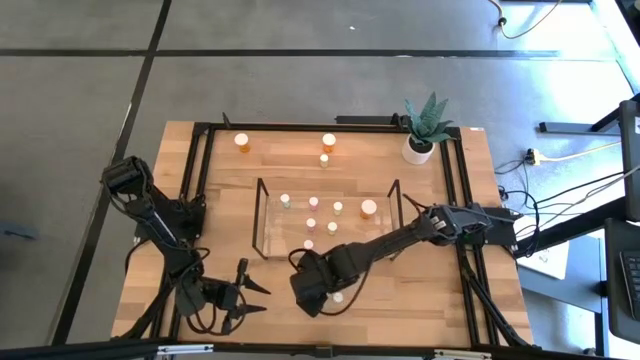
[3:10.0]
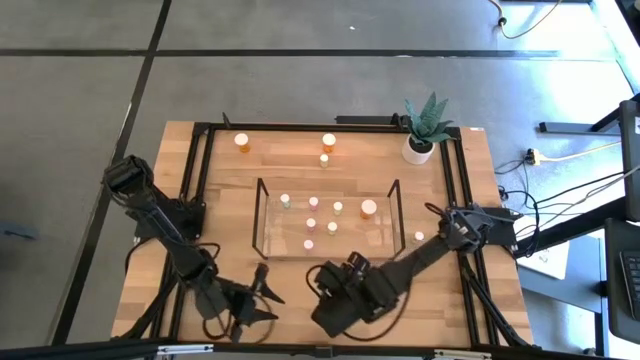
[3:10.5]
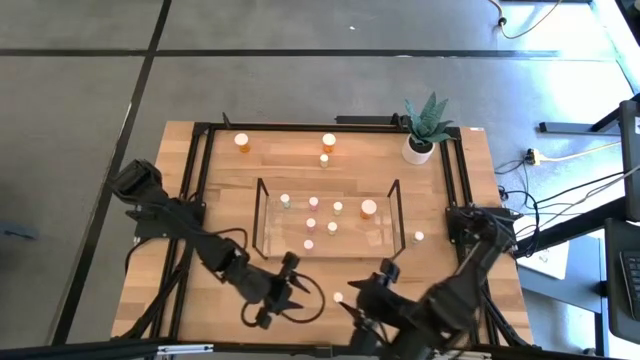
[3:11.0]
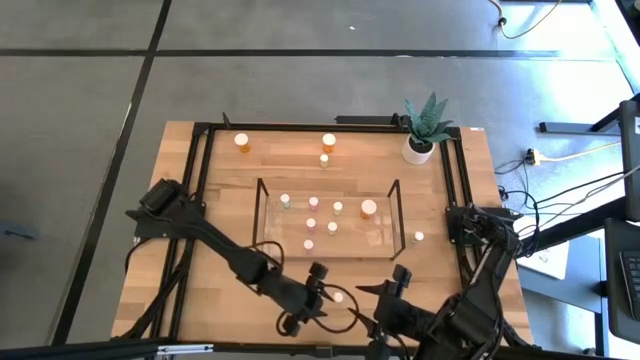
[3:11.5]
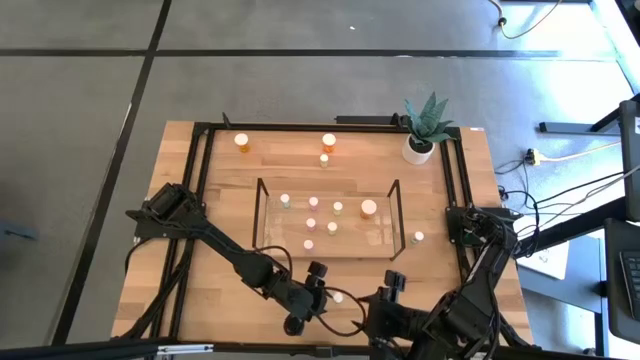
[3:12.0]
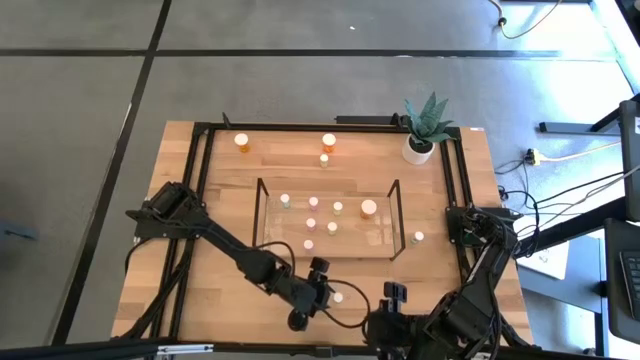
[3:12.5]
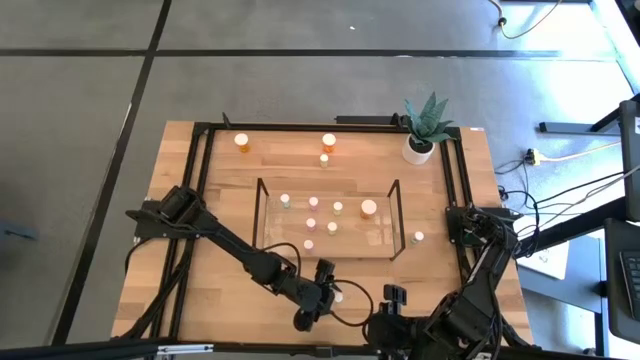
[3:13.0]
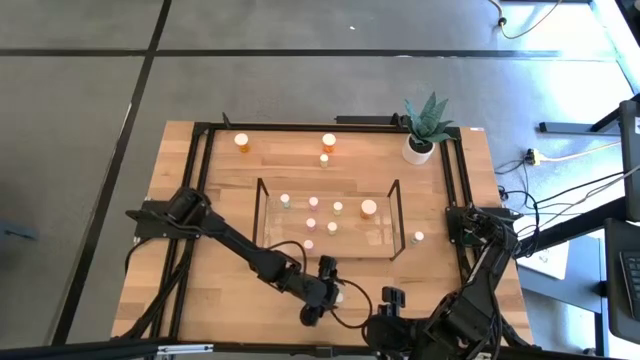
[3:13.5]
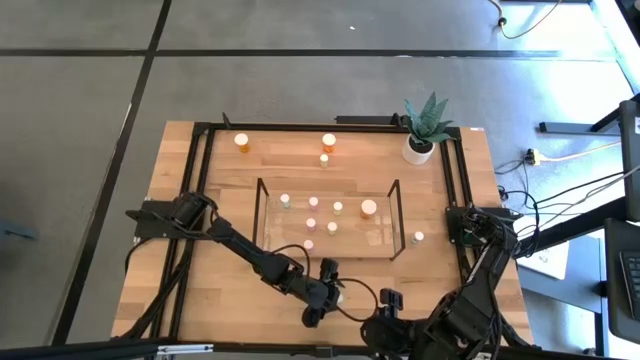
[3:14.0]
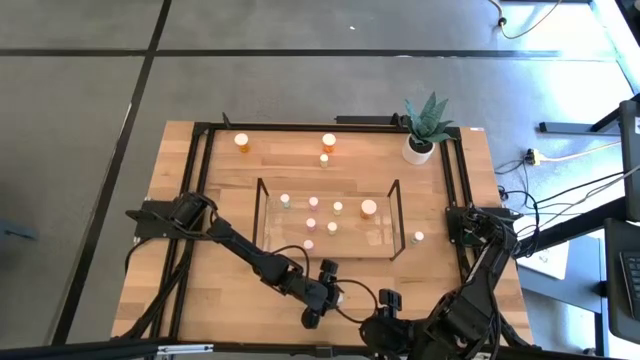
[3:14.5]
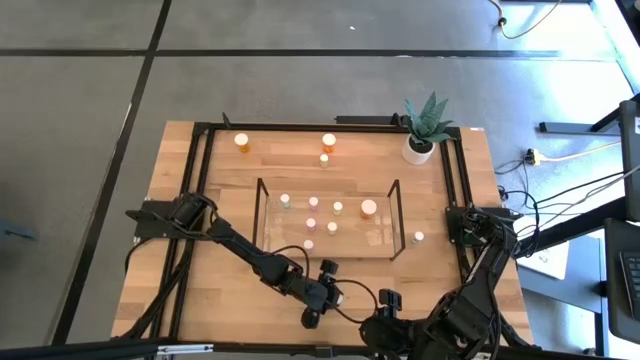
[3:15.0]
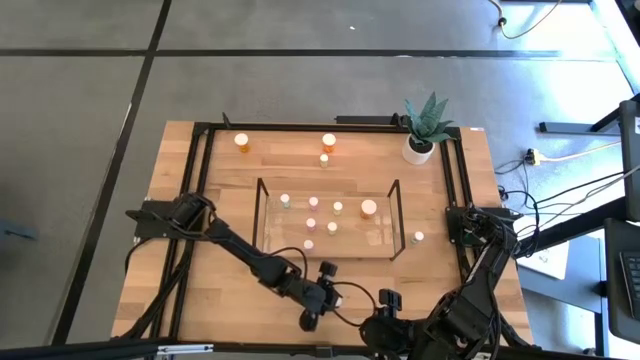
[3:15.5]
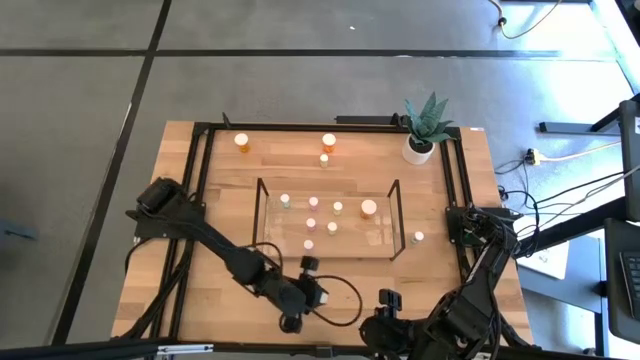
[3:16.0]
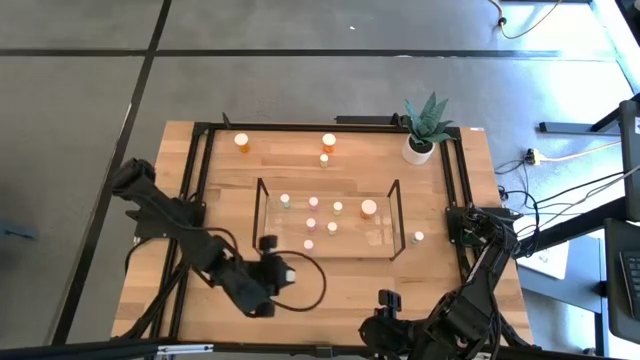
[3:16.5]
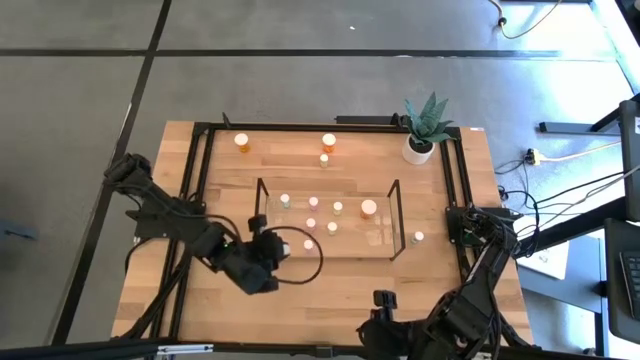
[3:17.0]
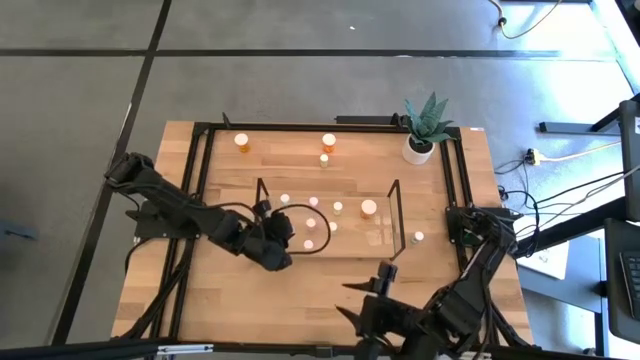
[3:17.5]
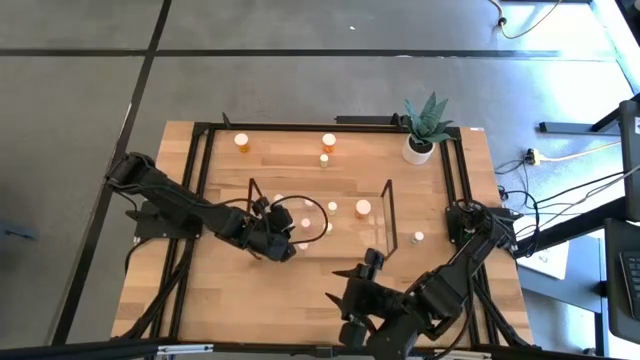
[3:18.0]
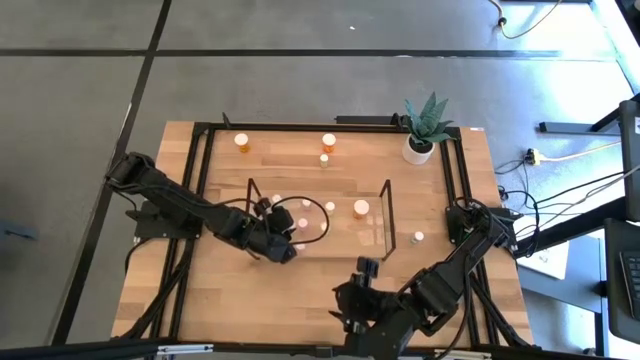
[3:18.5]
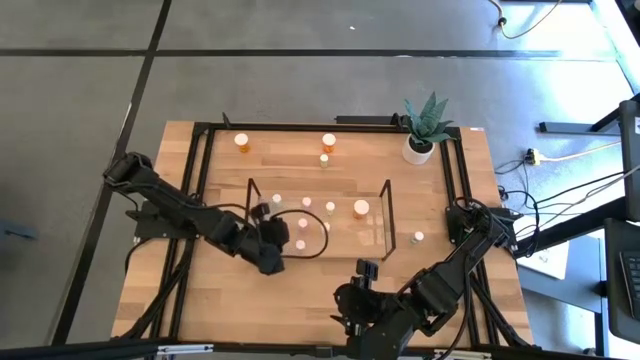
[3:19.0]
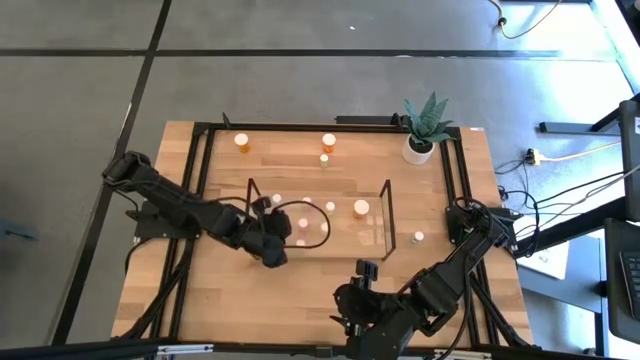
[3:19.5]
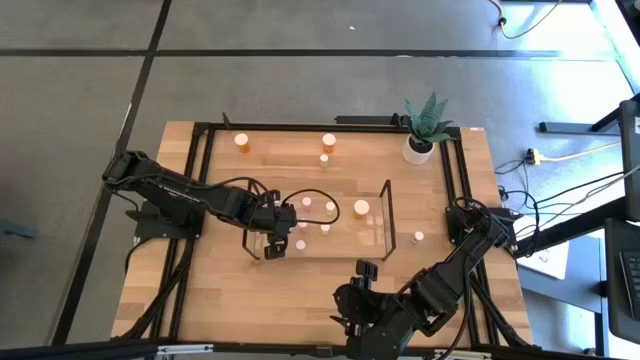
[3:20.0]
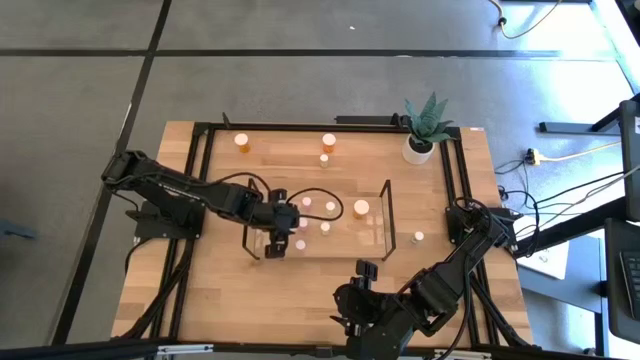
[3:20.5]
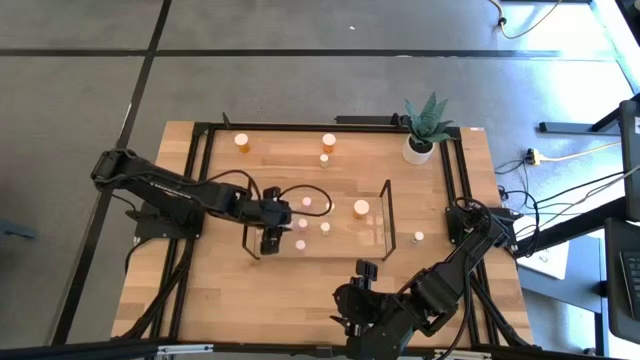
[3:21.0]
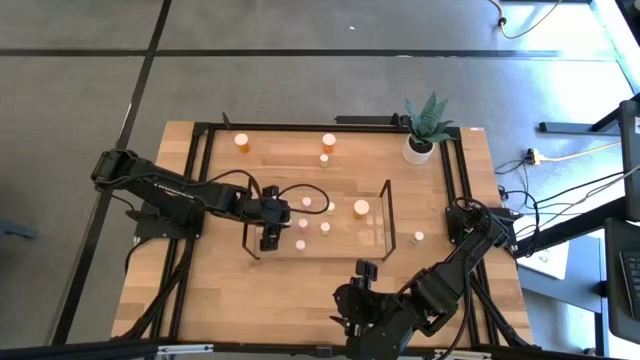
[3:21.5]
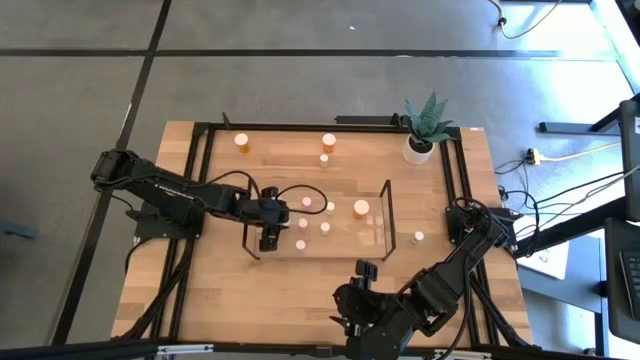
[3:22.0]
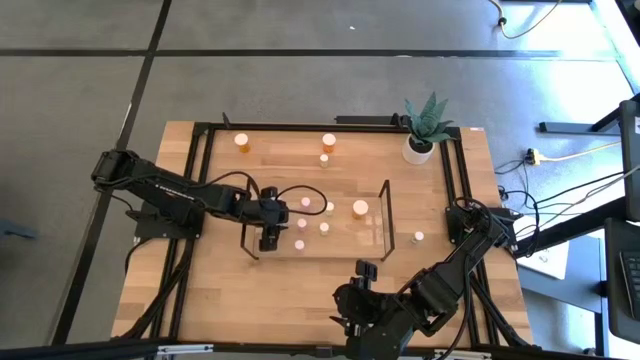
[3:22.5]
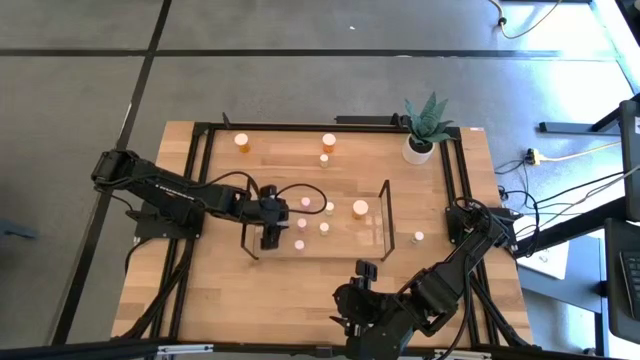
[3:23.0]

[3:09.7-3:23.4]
Task: Pick and place medicine bottles onto shelf by color
Put the bottom blue pill bottle on the shelf aligned with the other blue pill bottle

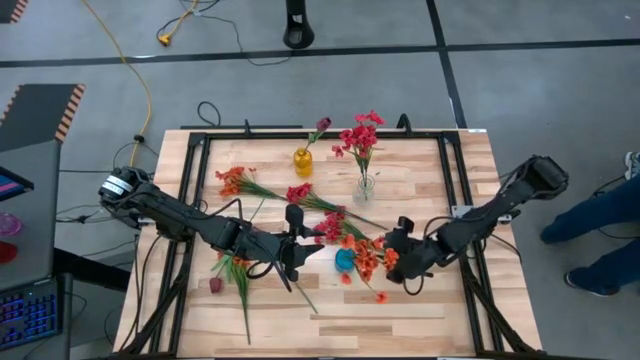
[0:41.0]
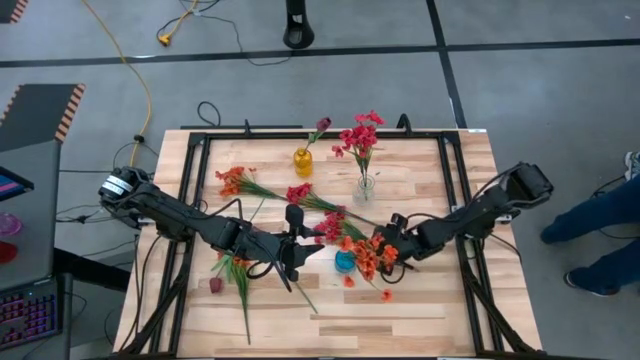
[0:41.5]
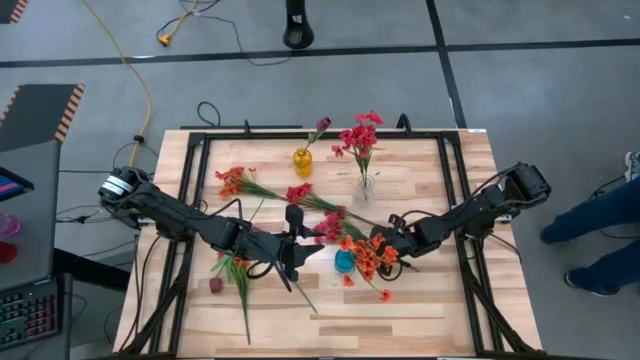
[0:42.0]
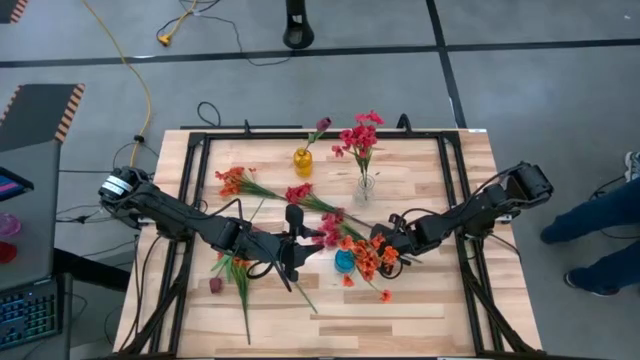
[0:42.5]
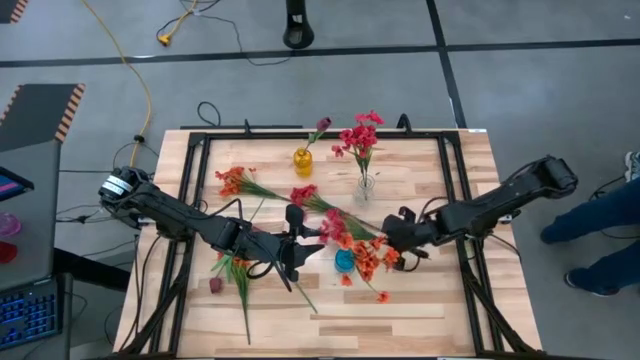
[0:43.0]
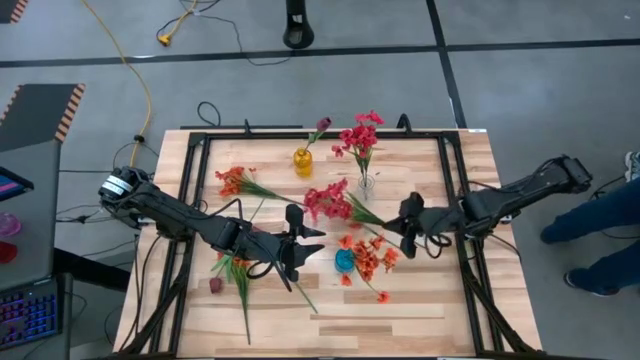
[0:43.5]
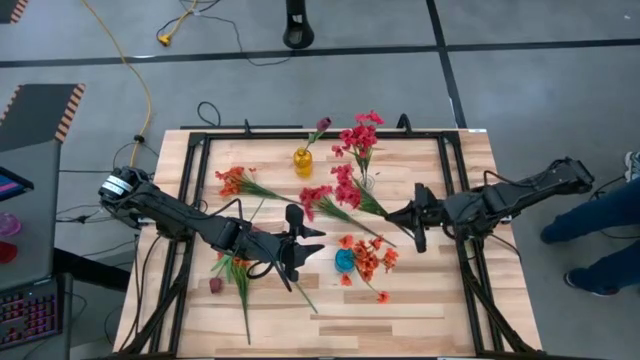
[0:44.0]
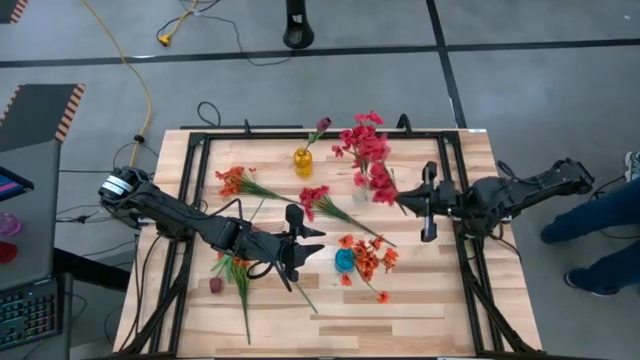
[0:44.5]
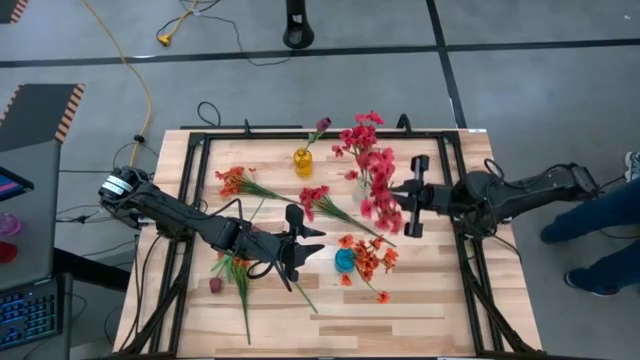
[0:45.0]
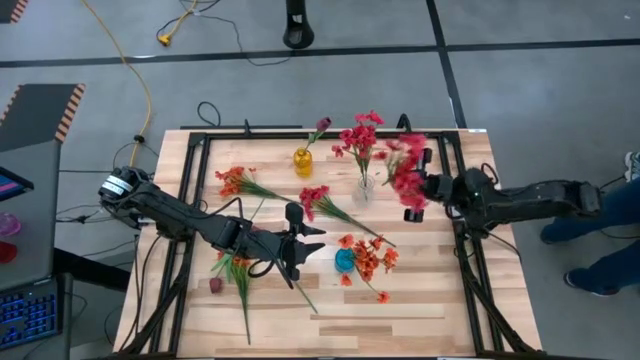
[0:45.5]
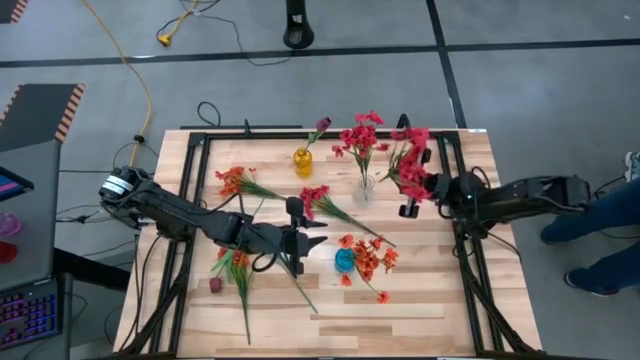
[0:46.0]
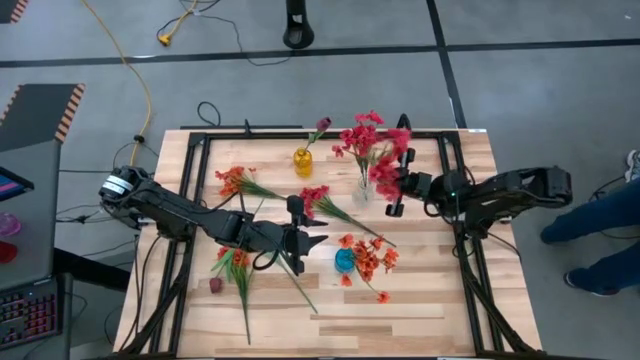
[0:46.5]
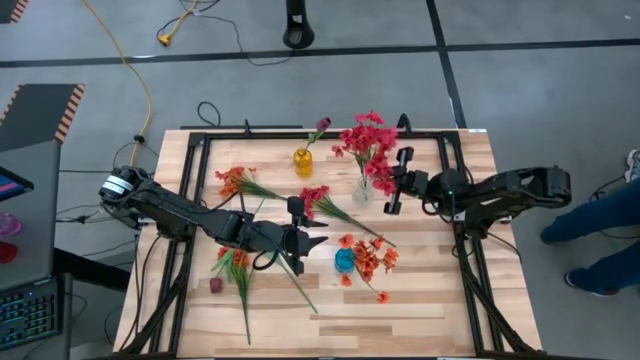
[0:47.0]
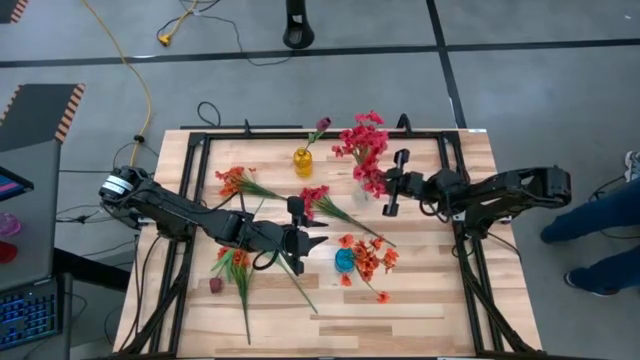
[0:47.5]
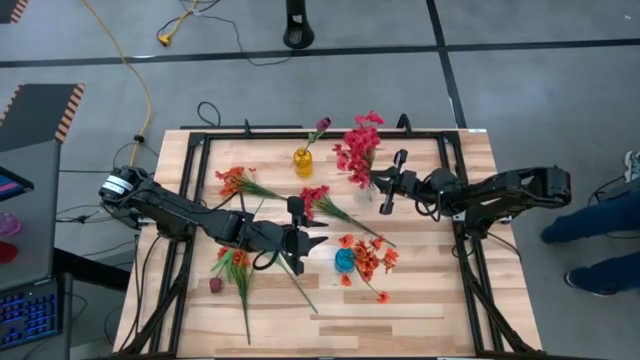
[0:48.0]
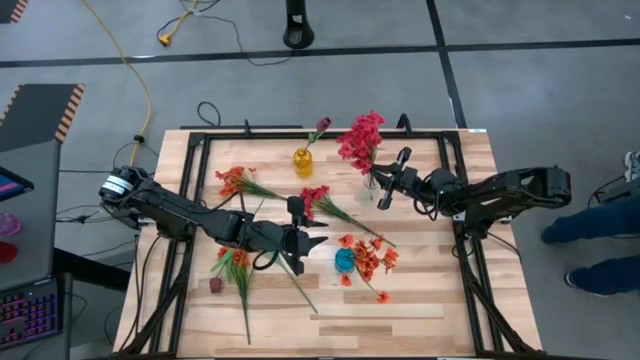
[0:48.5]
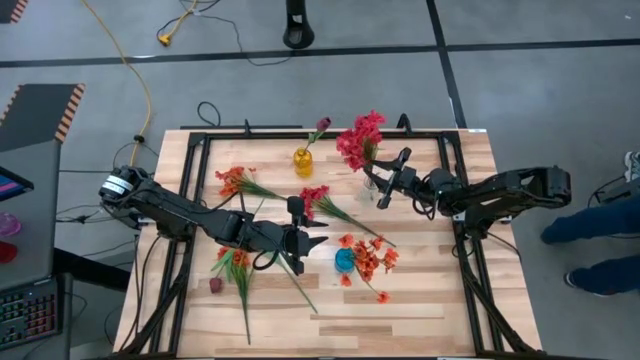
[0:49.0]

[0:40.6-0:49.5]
Task: Sort flowers into vase by color
Put the bottom red flowers into the transparent vase
